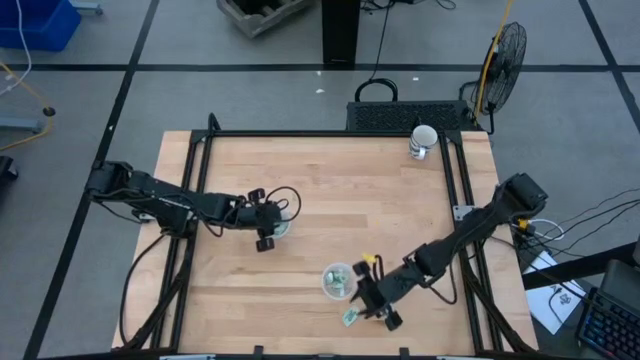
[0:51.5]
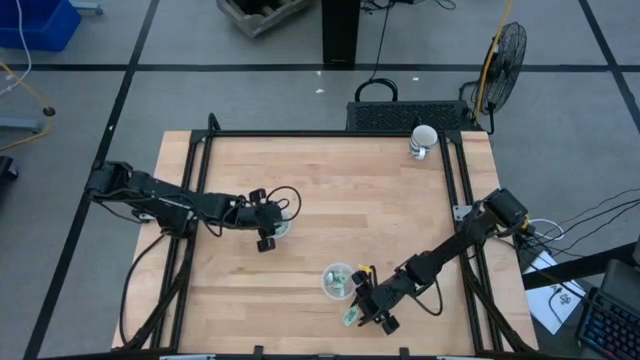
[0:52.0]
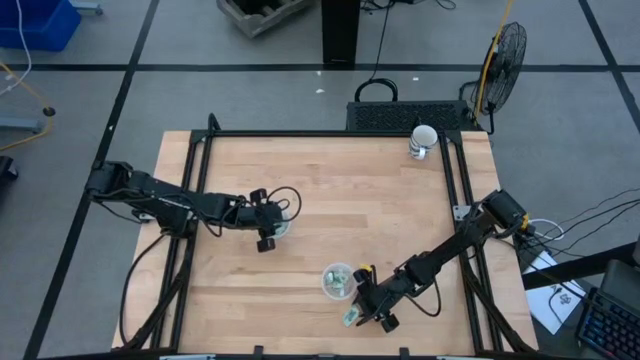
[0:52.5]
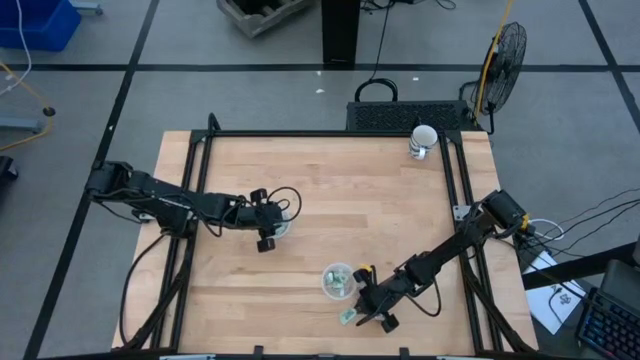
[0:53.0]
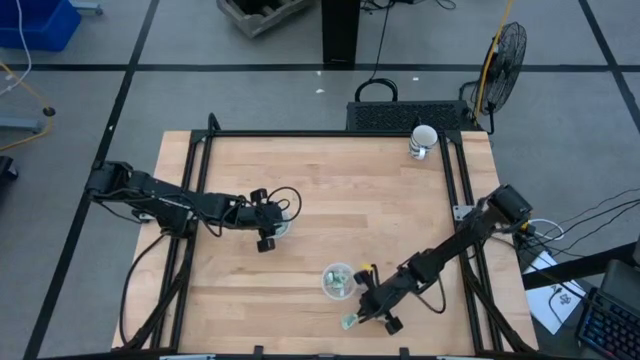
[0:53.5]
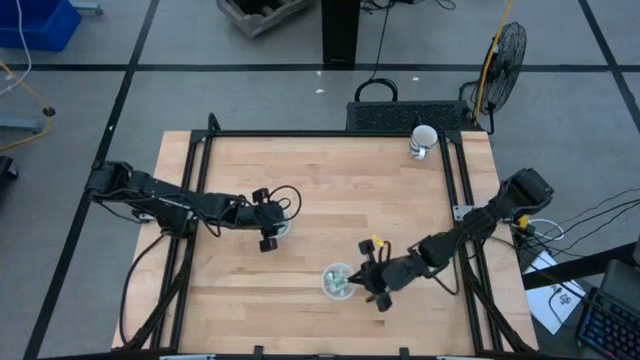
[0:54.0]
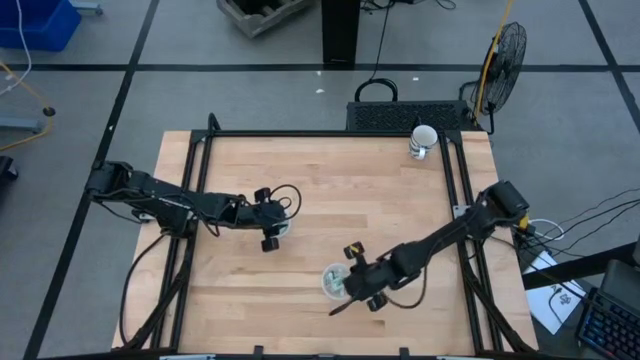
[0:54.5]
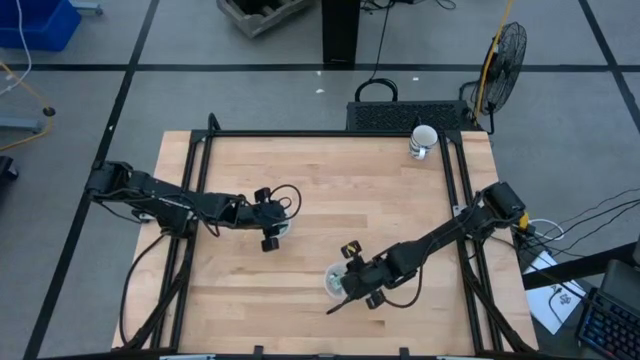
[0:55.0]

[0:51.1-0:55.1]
Task: Pick and place items into bin
Put the white stevia packet into the bottom transparent bin

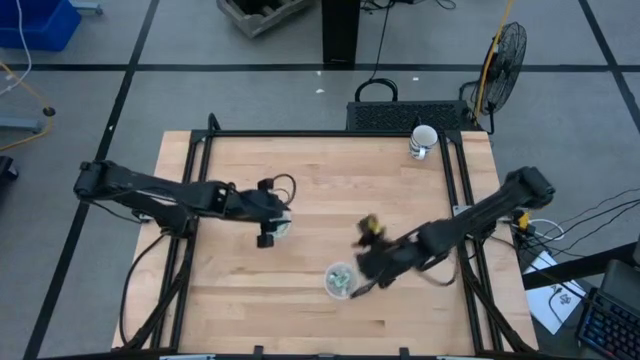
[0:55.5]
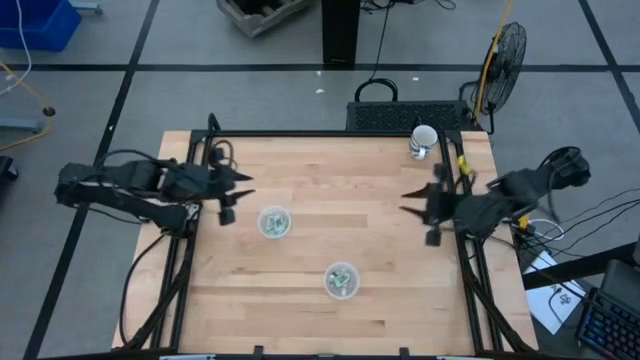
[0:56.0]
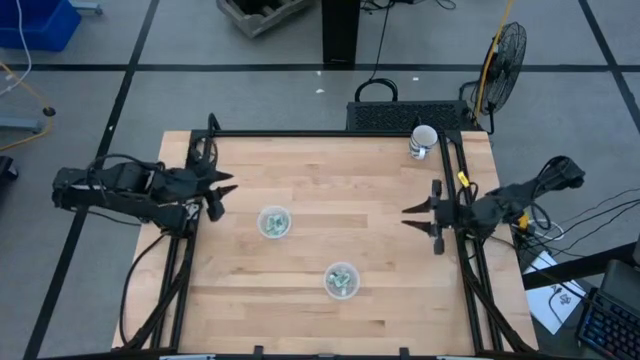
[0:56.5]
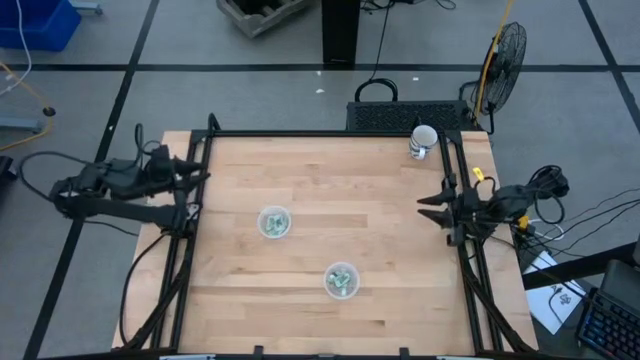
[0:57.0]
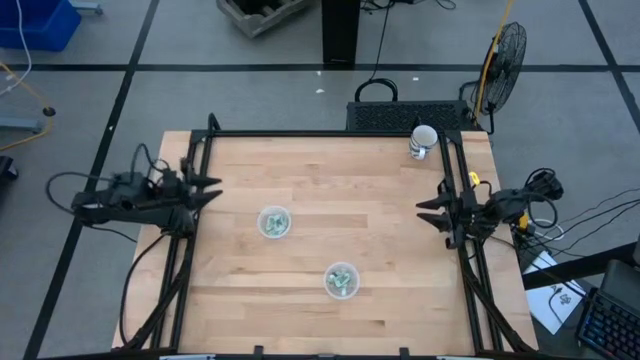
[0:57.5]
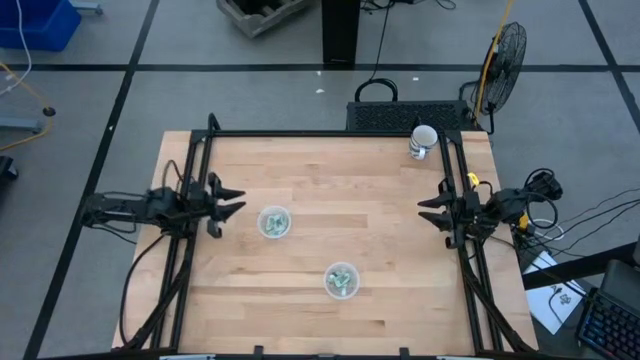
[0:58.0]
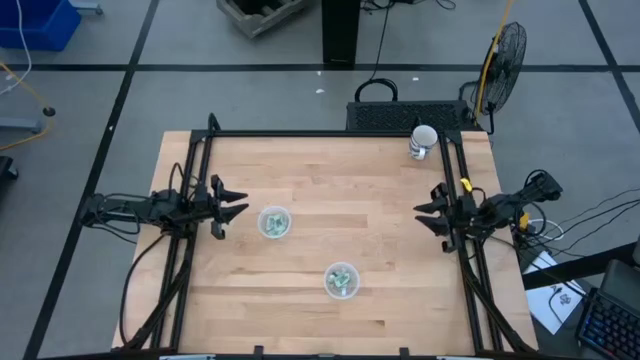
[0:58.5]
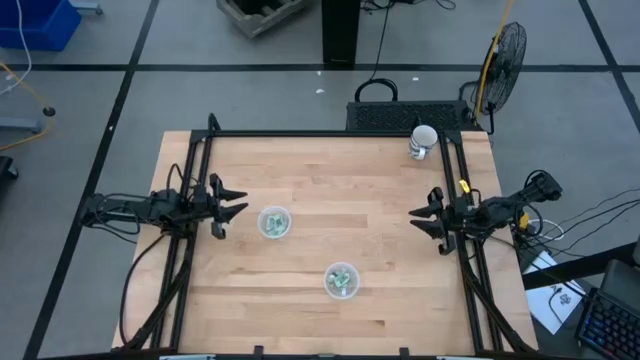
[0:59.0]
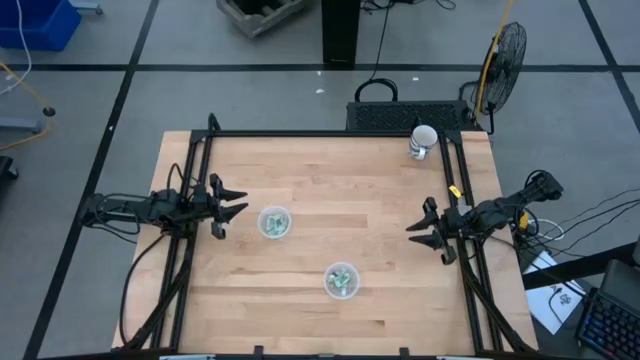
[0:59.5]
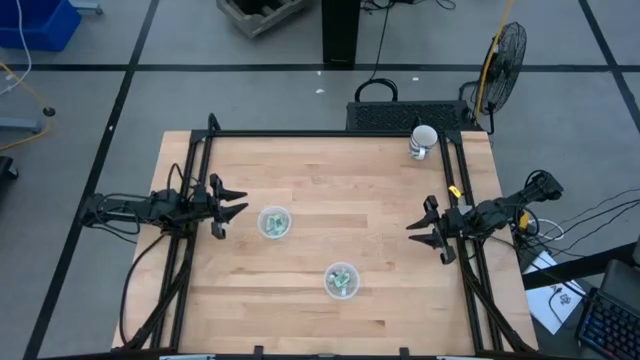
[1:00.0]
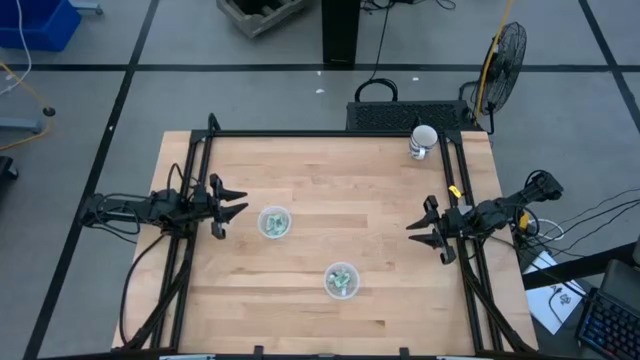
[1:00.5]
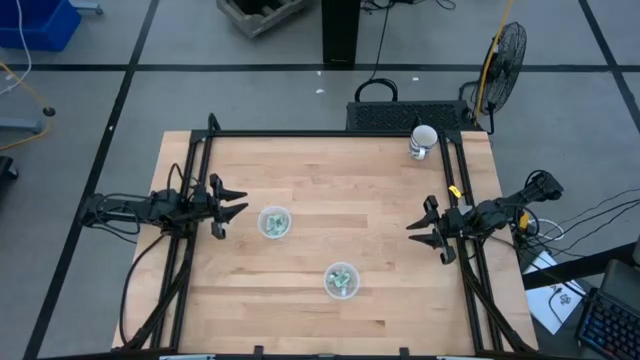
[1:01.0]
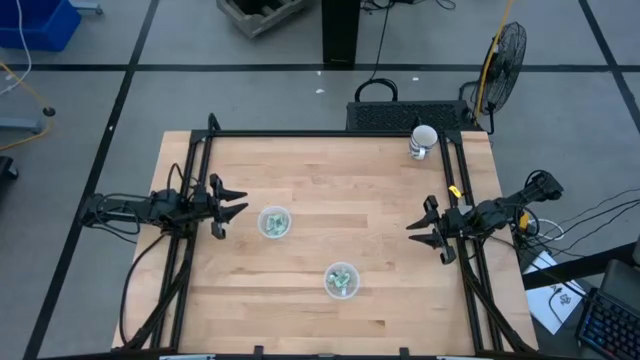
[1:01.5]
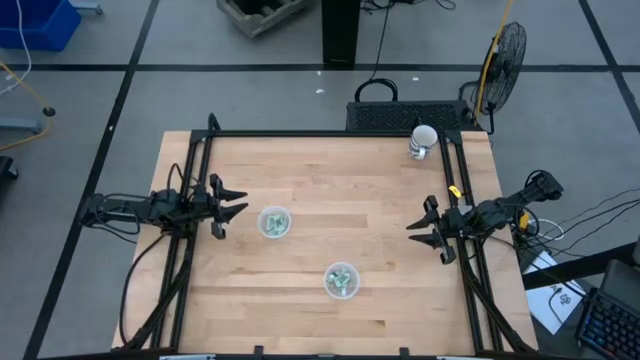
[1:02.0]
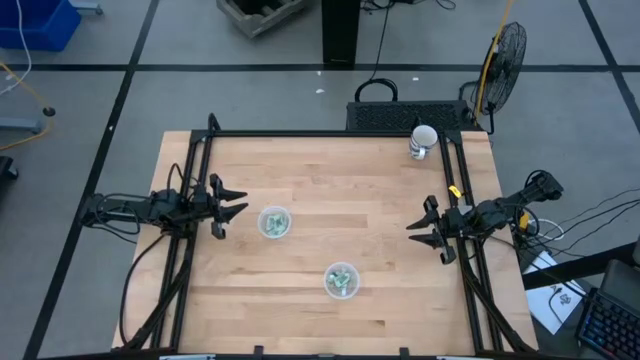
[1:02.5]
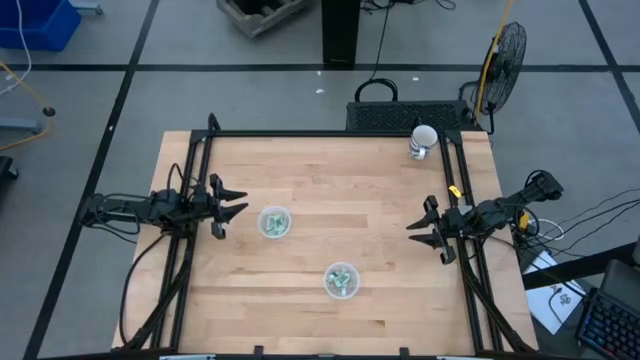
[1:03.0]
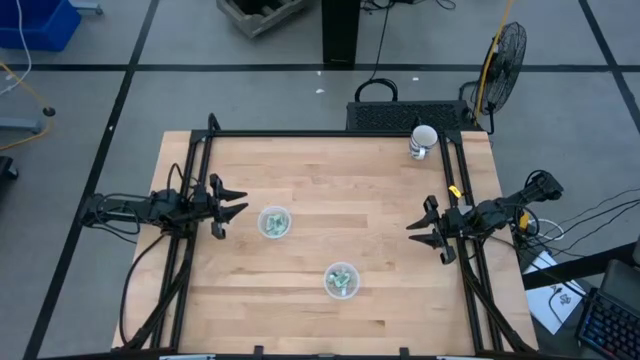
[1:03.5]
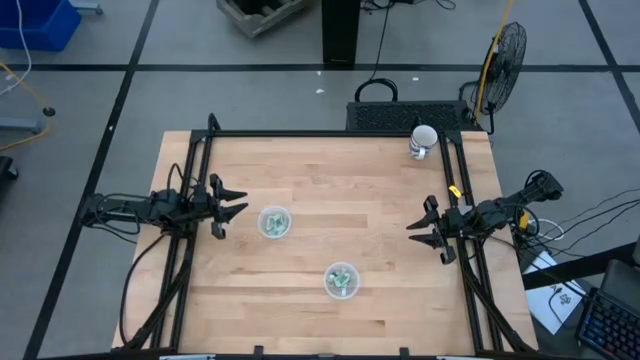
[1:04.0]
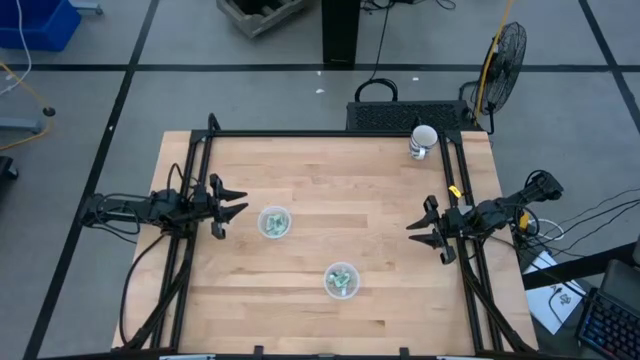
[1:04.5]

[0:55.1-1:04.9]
Return to Home Position

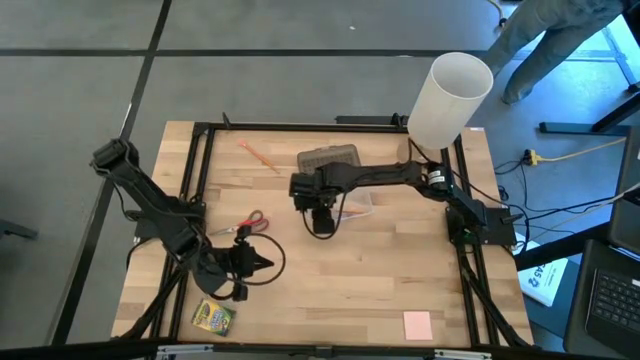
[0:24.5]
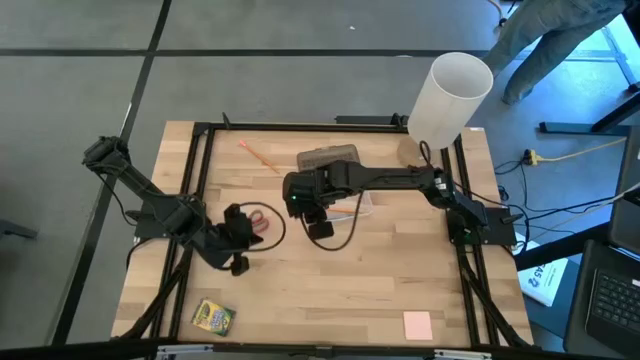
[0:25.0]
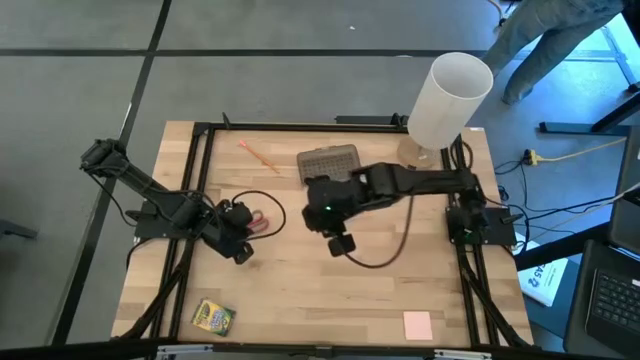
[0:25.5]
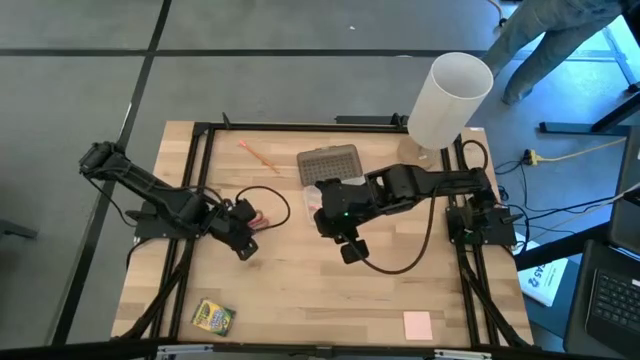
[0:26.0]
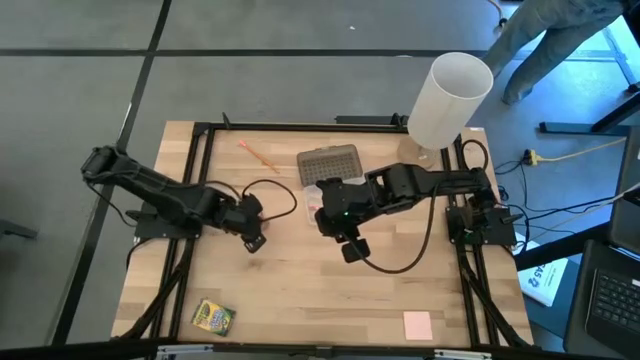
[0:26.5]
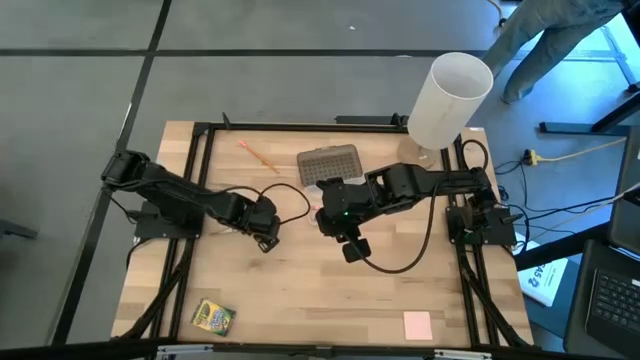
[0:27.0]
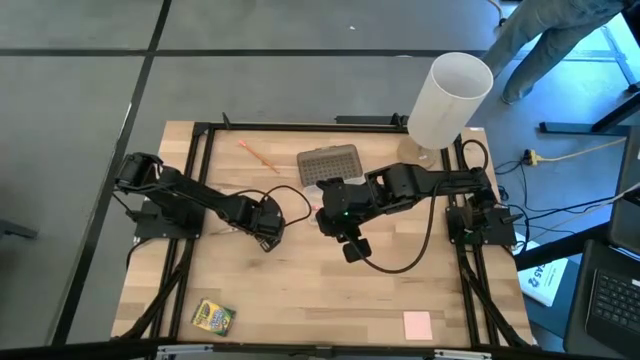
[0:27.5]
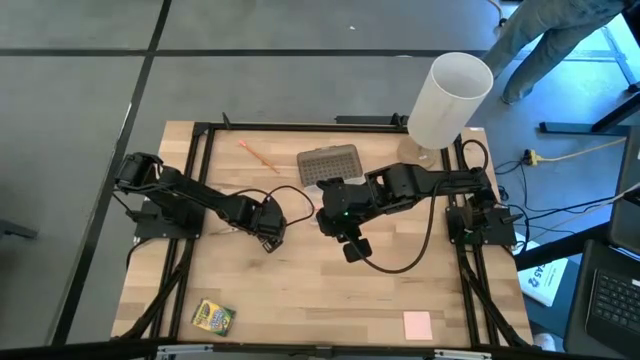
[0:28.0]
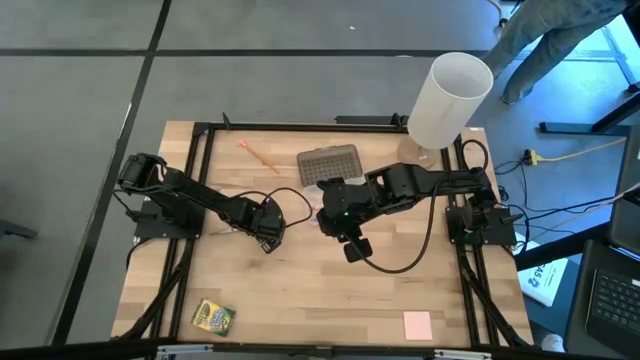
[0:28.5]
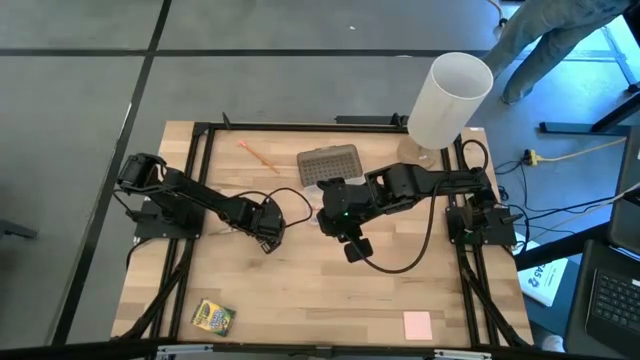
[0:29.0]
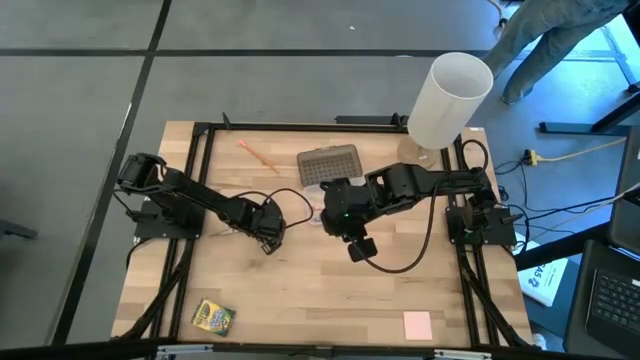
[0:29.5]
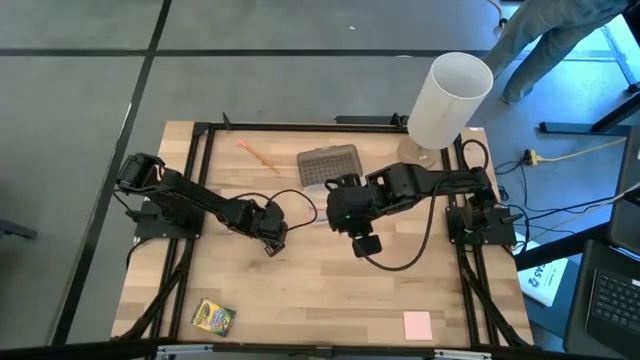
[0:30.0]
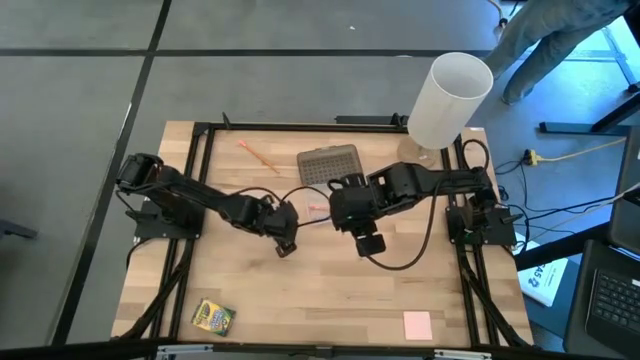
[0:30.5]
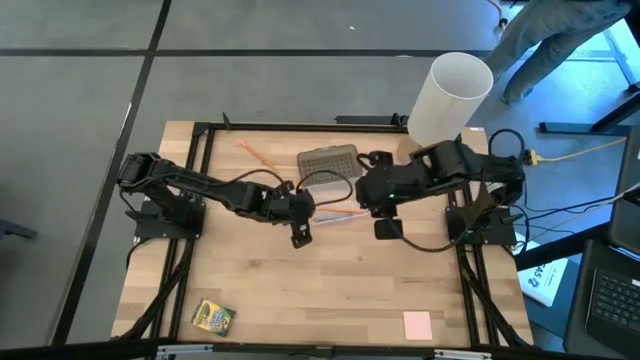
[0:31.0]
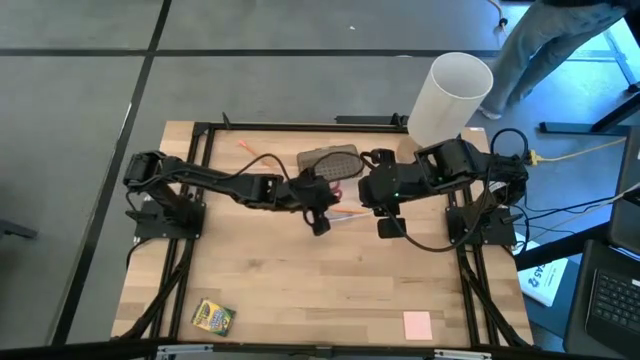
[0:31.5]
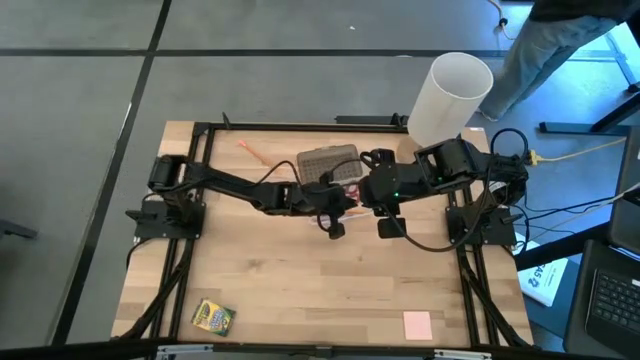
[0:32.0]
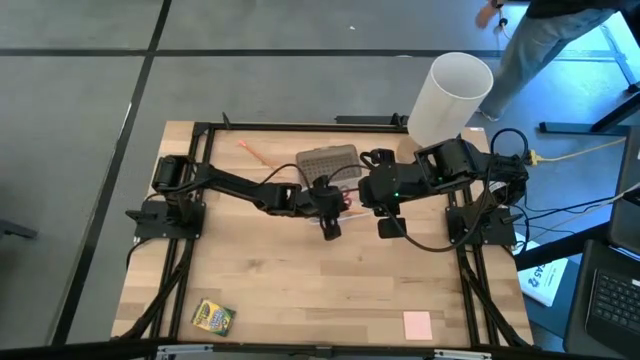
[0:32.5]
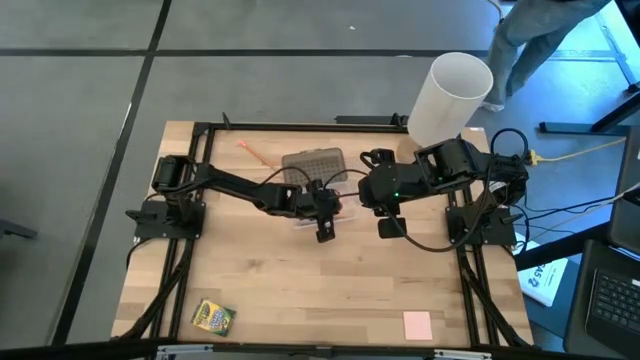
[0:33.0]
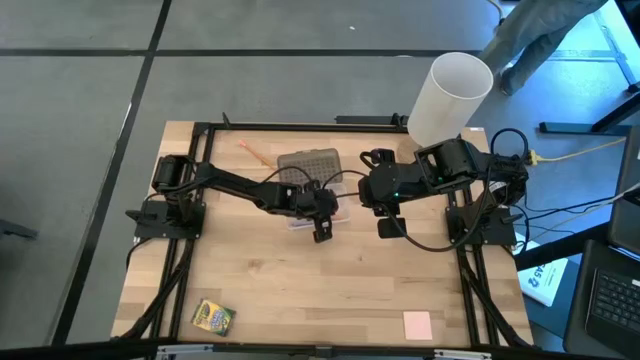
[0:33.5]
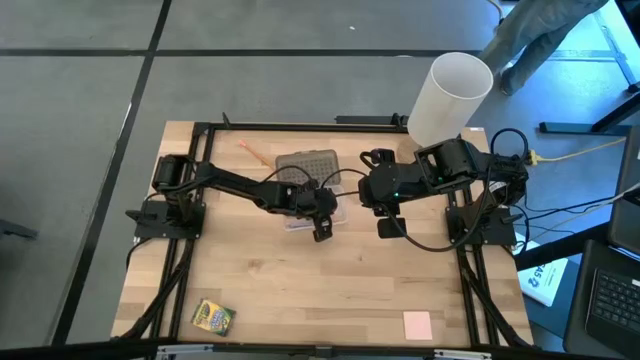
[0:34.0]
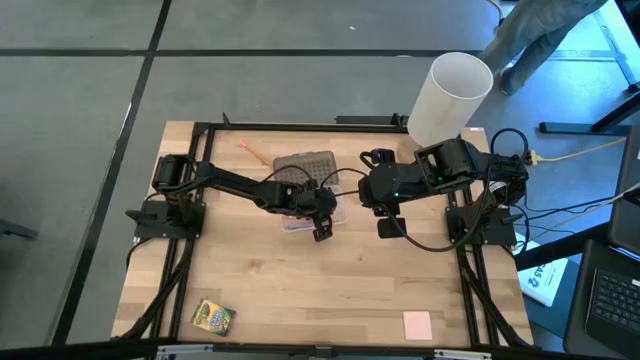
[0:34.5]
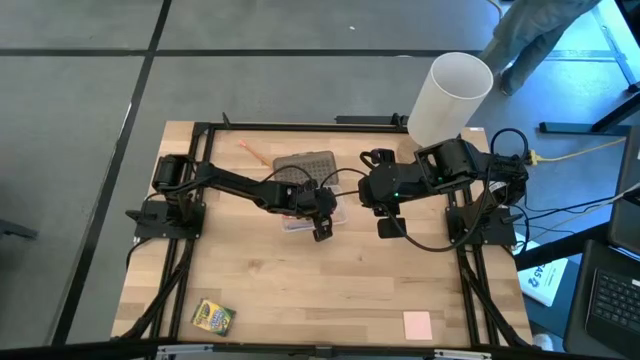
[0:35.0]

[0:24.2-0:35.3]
Task: Pack school essentials
Put the orange scissors into the black supply box
